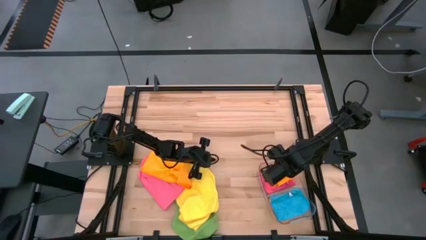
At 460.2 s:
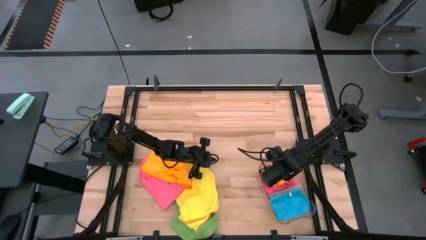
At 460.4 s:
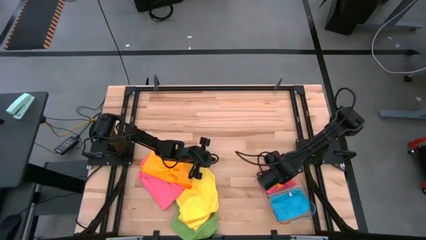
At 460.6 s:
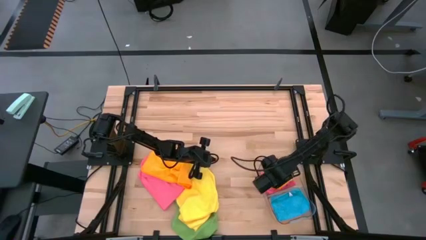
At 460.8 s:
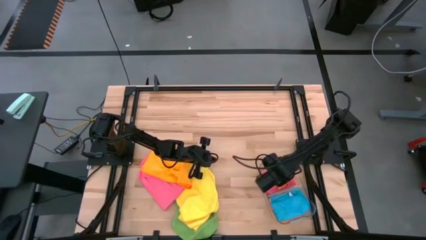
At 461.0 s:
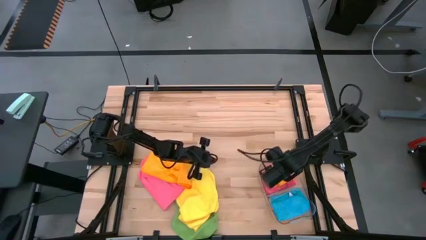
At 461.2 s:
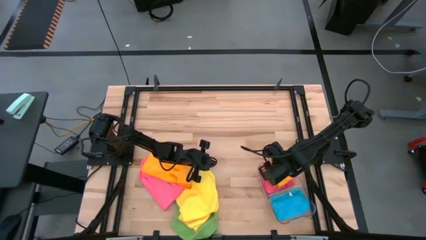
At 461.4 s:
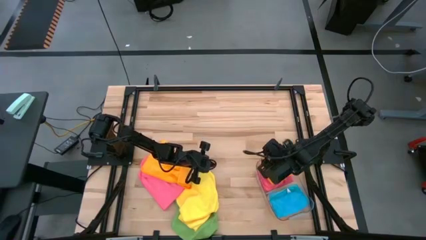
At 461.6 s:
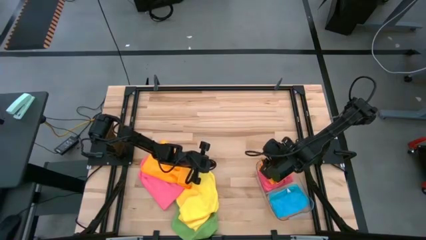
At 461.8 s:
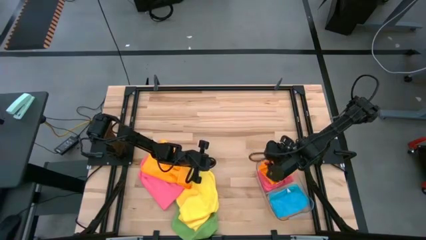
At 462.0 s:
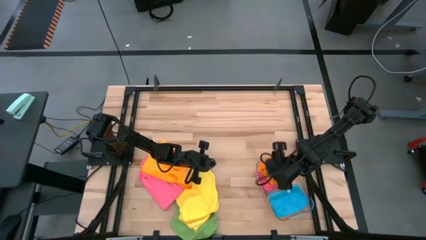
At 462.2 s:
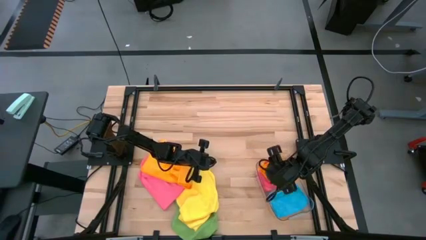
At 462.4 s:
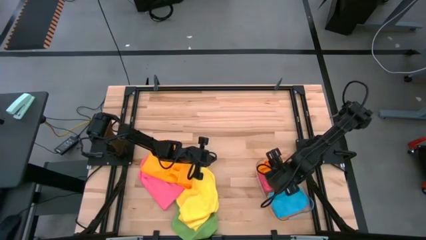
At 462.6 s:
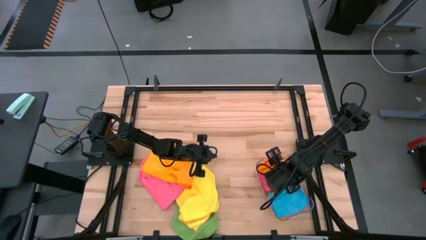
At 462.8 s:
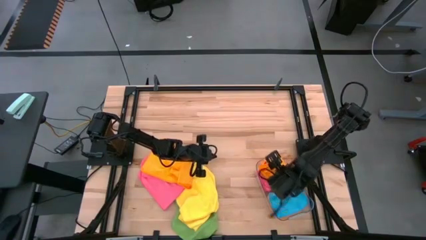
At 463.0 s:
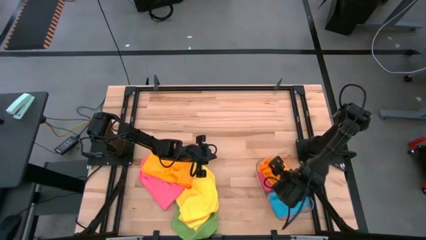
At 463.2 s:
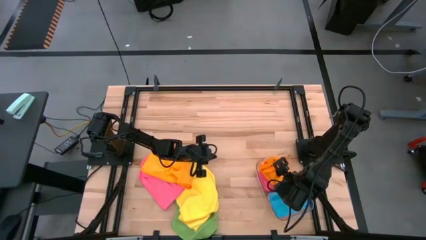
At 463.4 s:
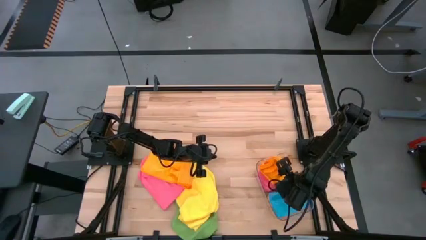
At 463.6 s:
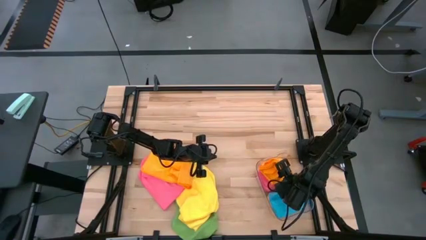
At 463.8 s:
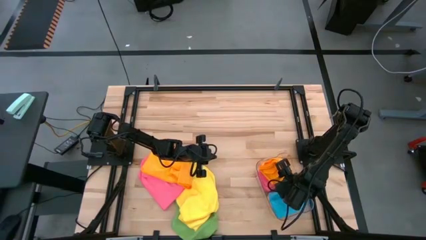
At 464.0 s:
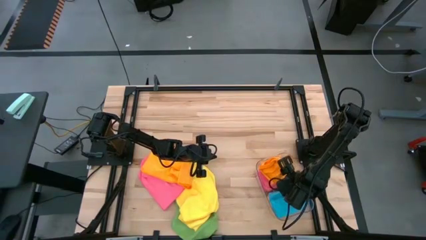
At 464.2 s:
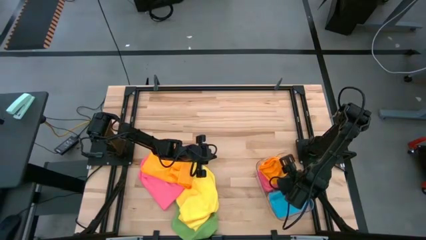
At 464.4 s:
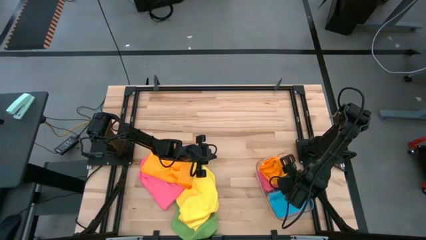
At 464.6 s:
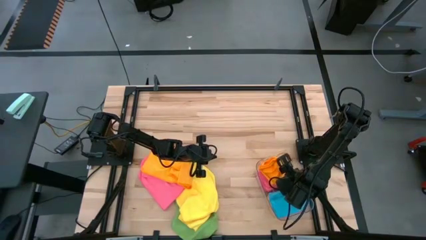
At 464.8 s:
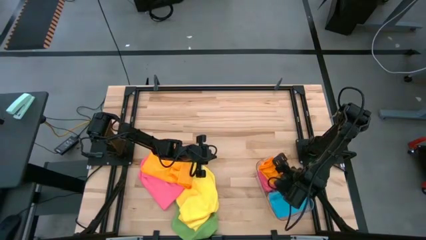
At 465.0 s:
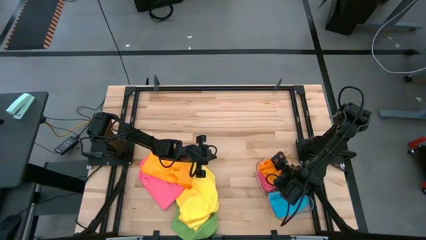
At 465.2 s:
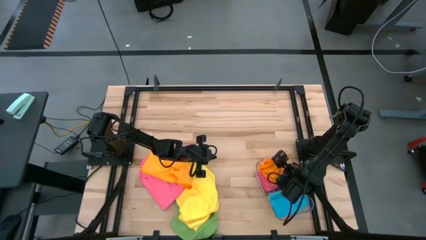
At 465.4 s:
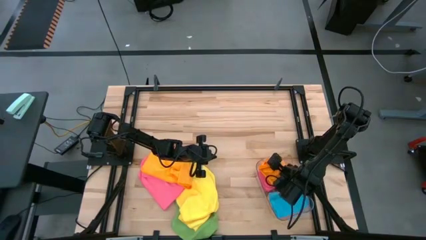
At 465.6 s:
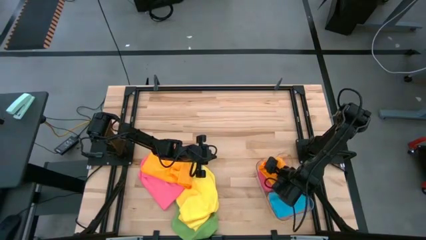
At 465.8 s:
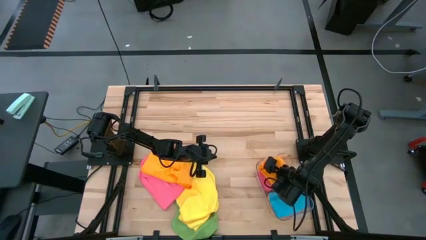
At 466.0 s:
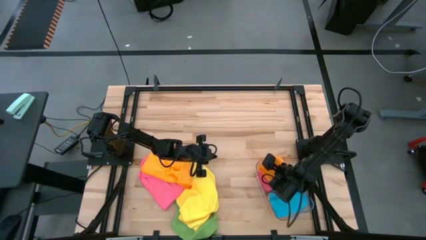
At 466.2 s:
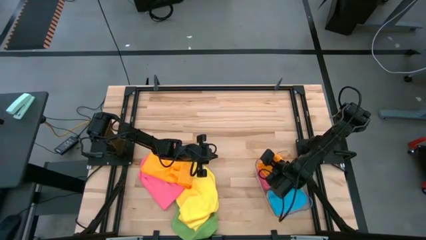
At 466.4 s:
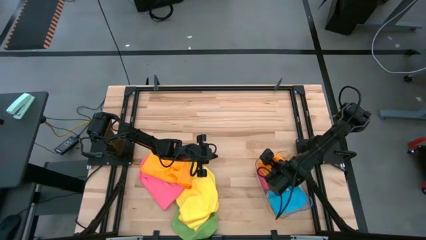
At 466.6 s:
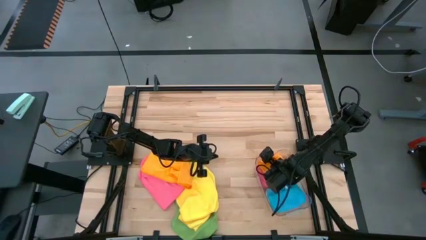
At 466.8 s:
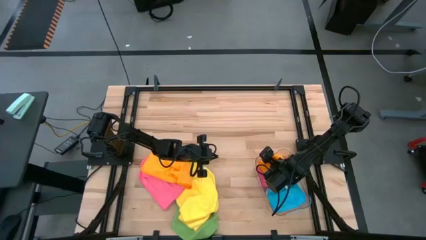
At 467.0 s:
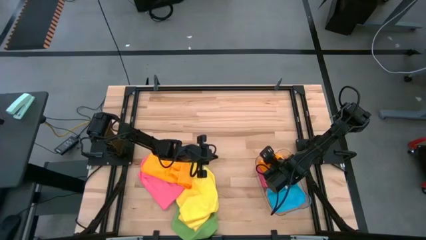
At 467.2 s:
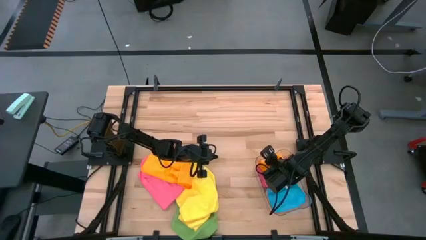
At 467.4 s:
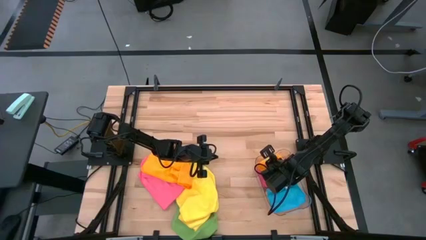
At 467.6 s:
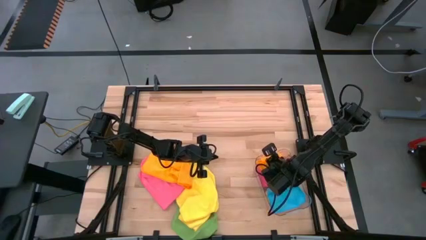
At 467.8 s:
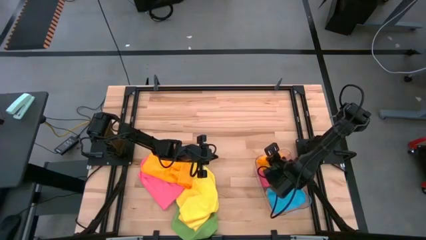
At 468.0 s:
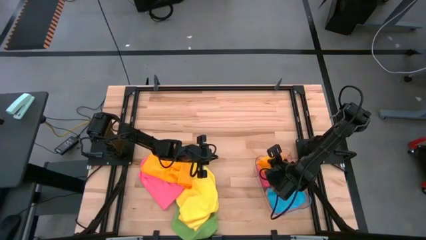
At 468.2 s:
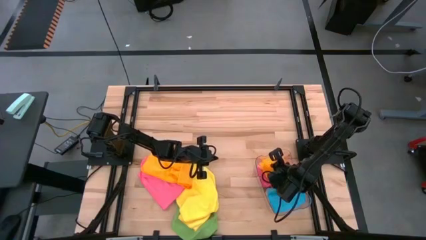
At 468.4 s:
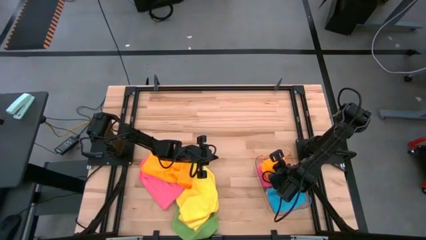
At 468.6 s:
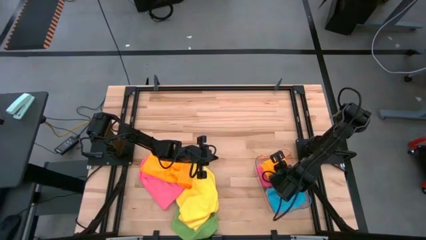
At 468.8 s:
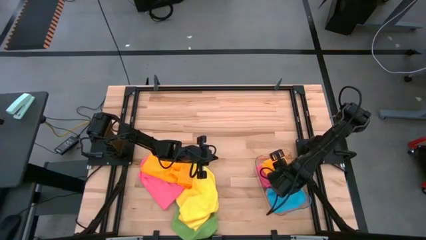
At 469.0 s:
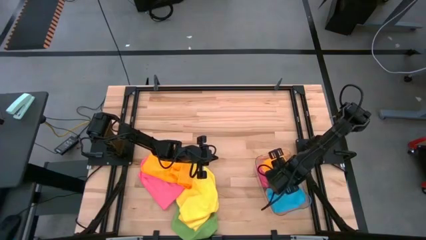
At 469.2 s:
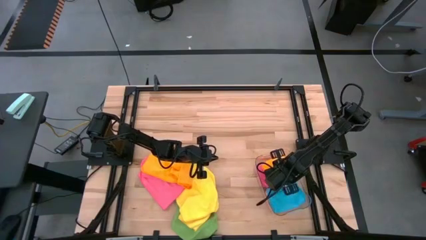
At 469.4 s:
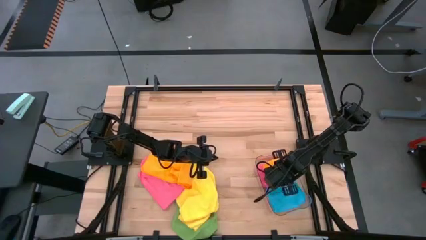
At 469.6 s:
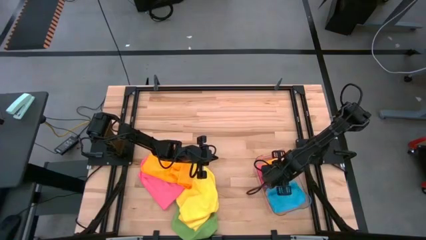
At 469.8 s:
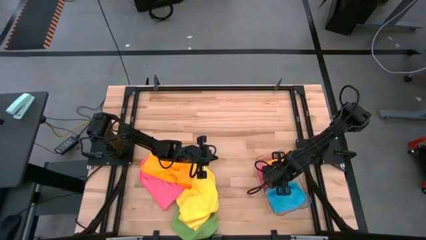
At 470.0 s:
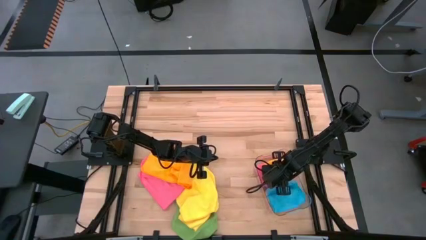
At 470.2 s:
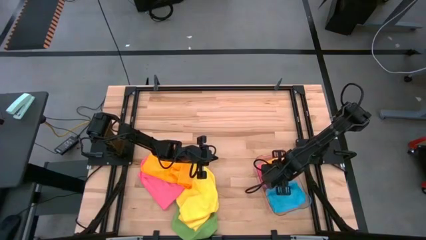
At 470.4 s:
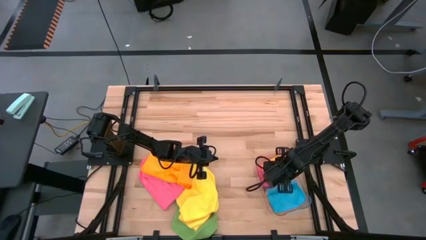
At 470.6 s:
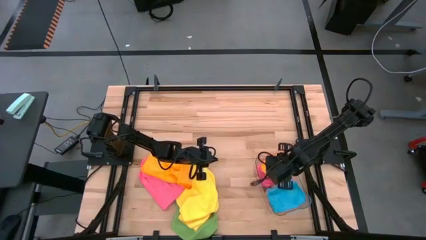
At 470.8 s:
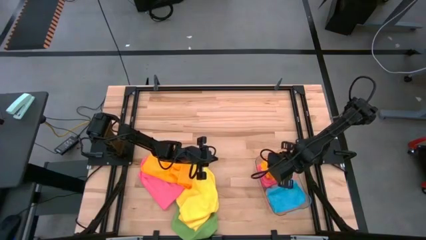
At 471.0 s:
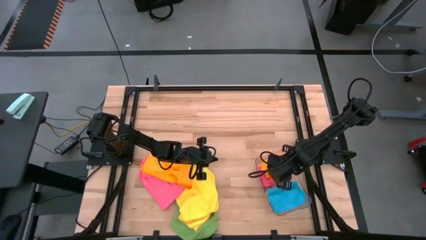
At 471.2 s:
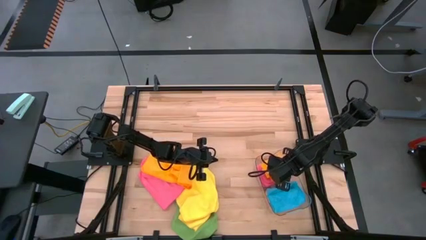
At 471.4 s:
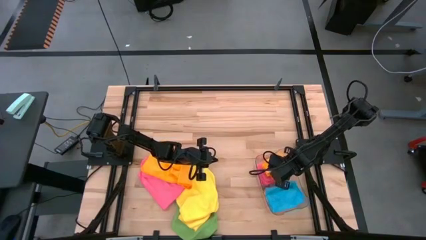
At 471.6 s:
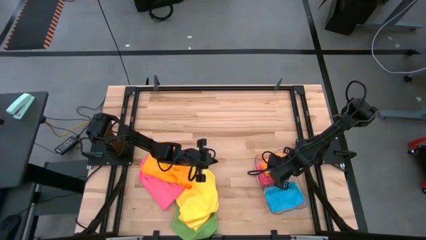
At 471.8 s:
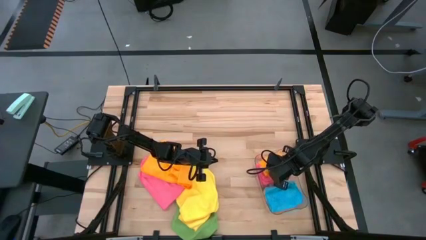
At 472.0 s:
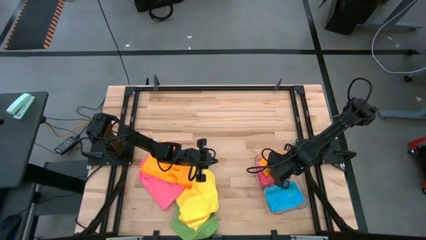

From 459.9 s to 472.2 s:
Task: Fold microfiber towels
Put the folded orange towel into the transparent bin

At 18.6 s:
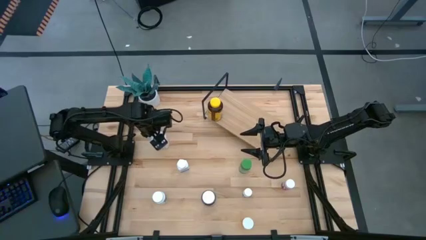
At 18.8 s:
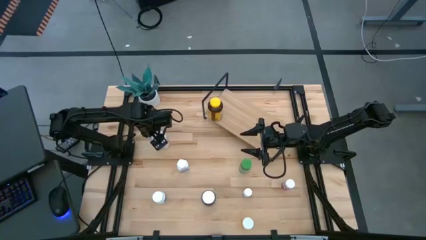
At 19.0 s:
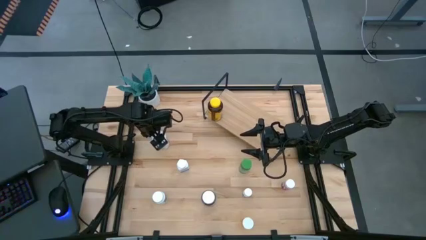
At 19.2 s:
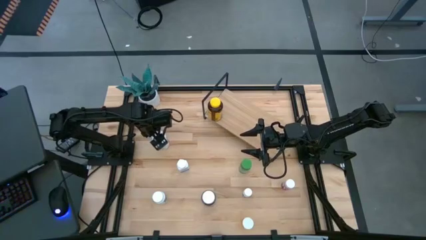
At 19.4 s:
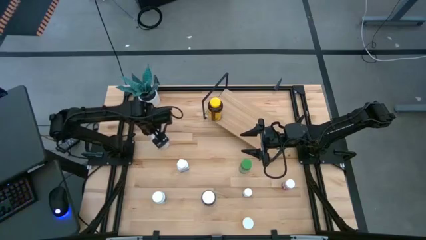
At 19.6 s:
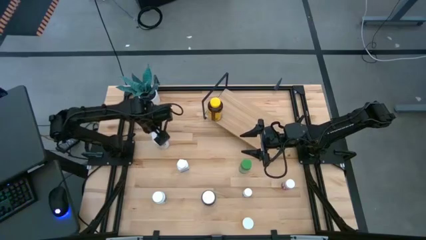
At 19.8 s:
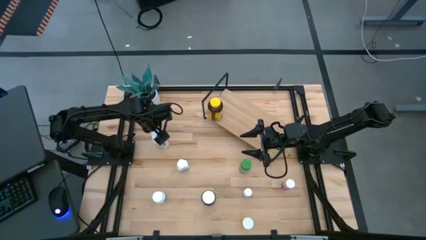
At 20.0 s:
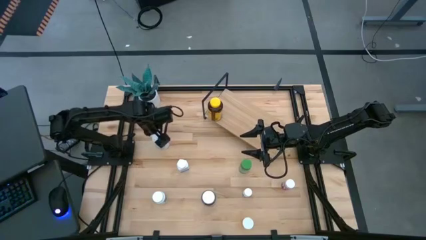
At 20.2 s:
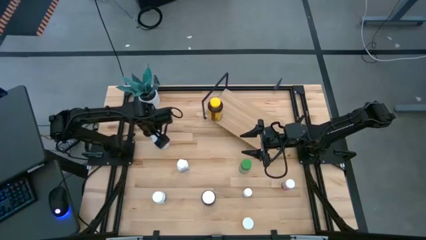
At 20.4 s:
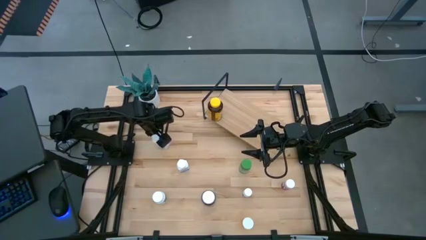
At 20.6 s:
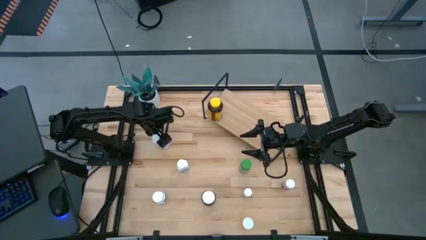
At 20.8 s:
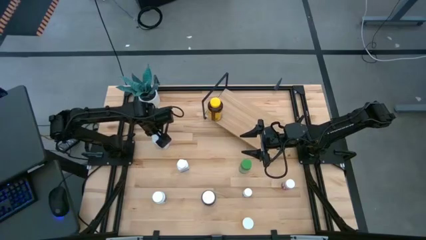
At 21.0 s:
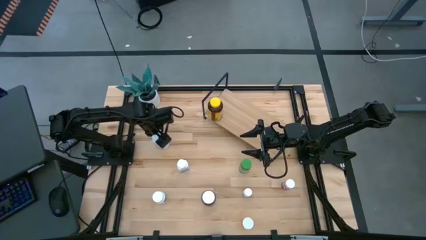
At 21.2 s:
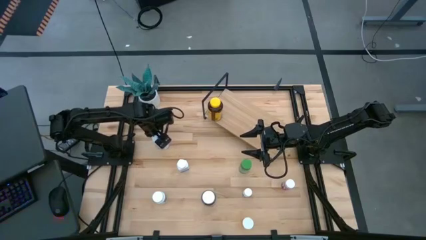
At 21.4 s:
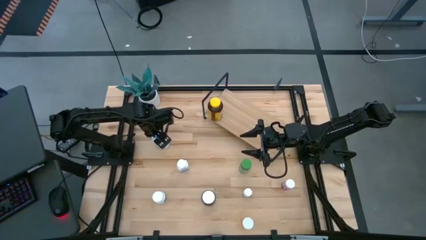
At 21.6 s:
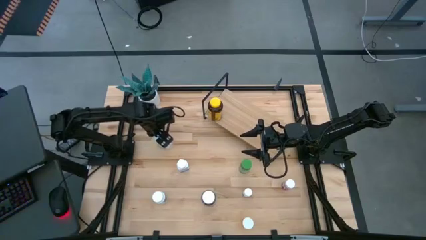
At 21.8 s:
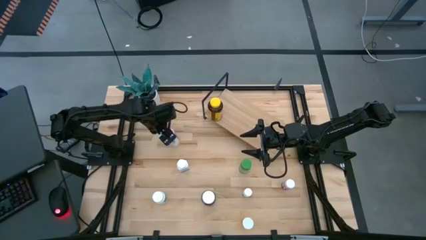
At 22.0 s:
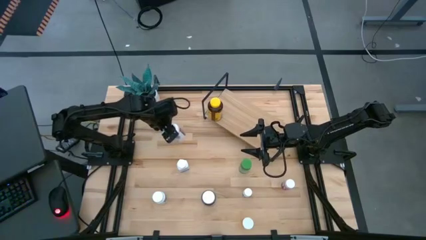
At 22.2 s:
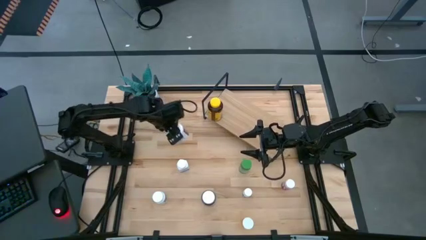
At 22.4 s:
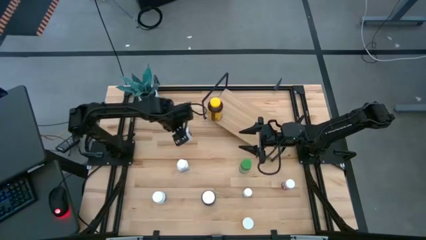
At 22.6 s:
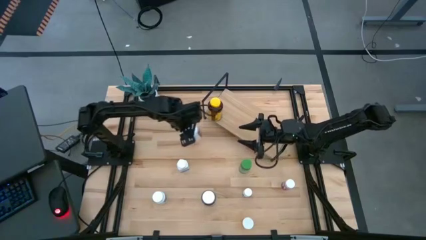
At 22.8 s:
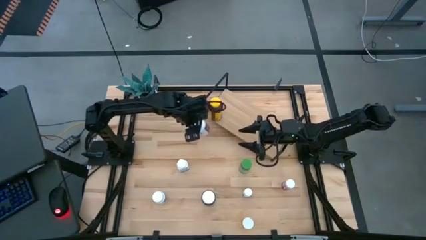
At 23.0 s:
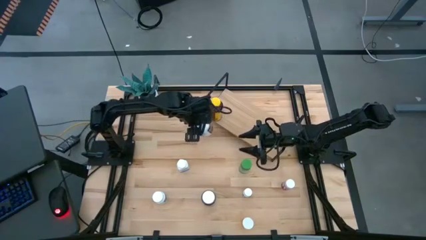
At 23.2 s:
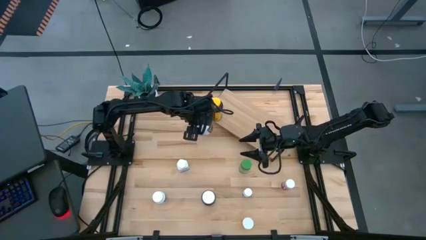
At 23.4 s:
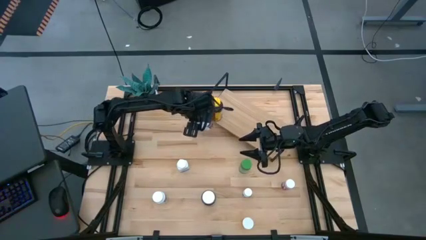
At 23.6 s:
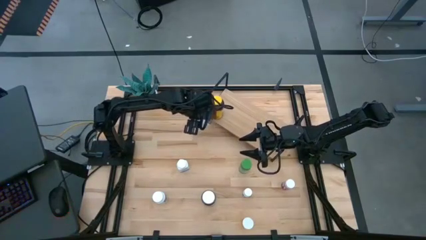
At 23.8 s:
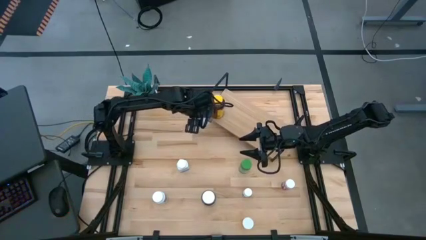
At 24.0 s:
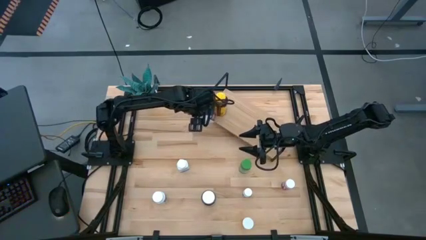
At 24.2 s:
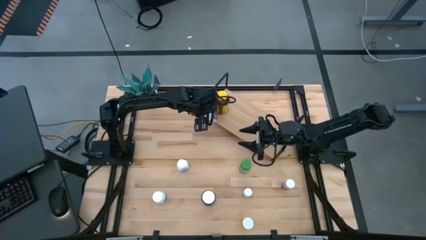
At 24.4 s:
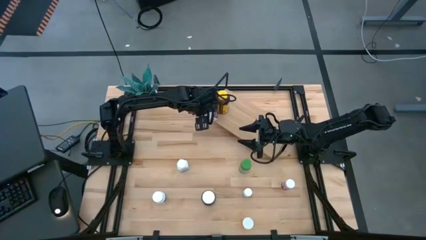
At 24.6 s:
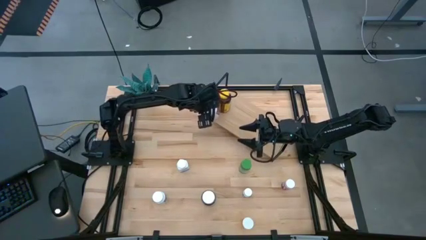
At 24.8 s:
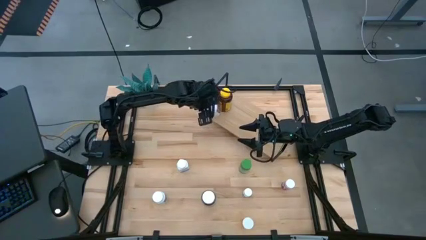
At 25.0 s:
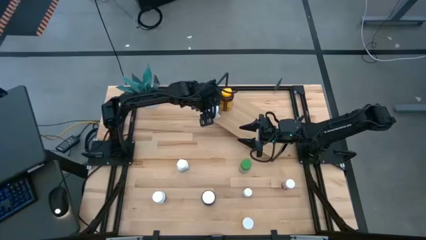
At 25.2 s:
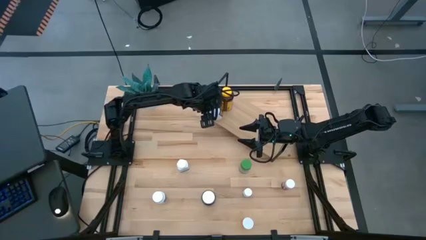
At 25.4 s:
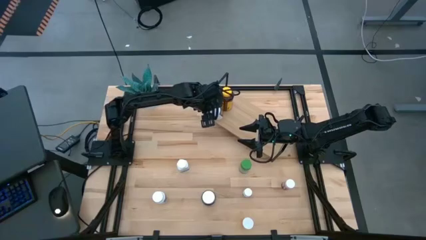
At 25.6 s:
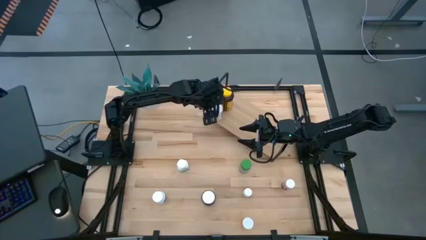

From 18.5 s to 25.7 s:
Task: Pick and place medicine bottles onto shelf by color
Put the white and red pill bottle on the shelf
